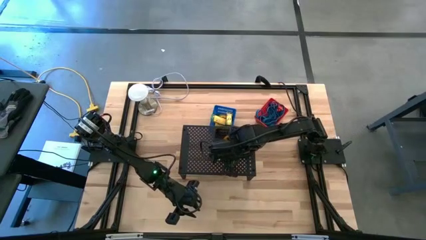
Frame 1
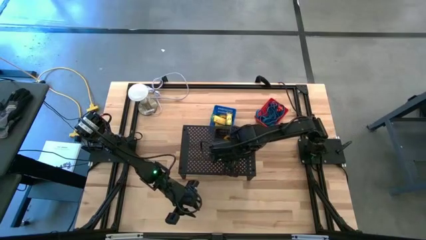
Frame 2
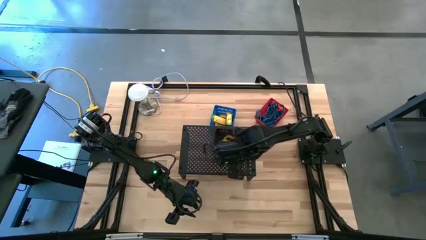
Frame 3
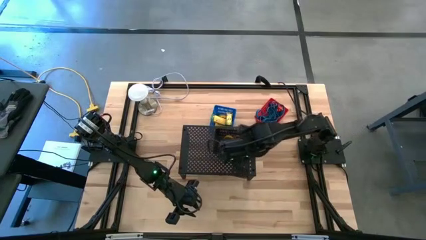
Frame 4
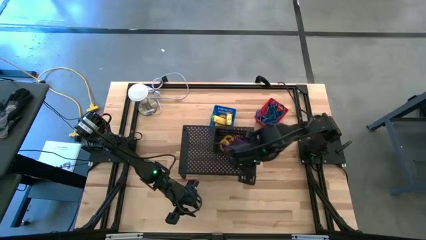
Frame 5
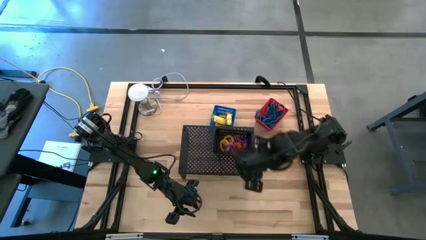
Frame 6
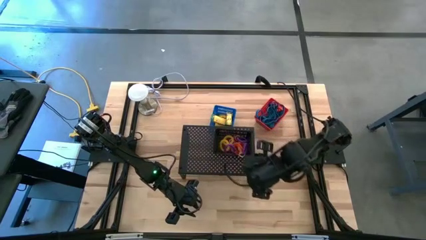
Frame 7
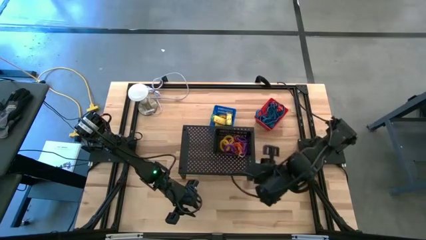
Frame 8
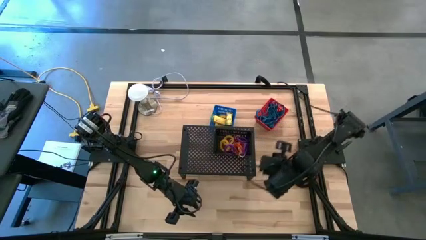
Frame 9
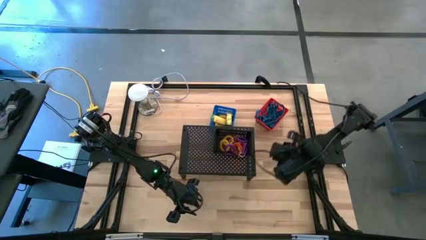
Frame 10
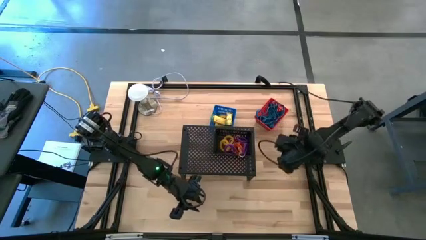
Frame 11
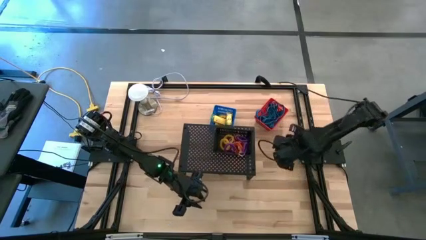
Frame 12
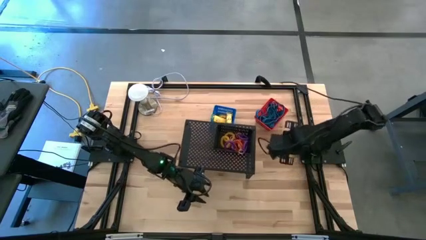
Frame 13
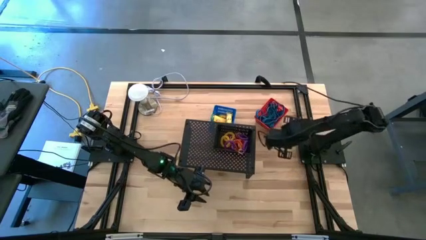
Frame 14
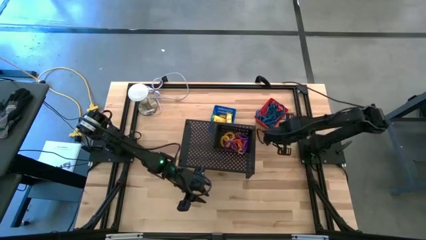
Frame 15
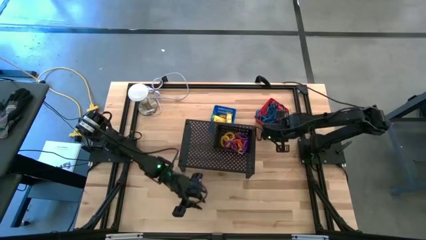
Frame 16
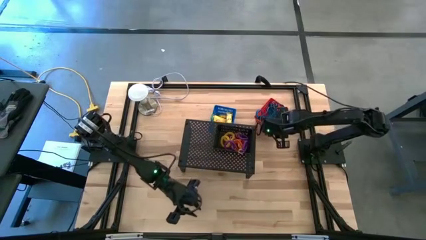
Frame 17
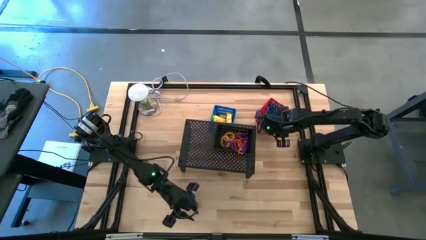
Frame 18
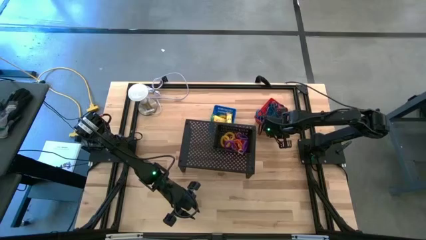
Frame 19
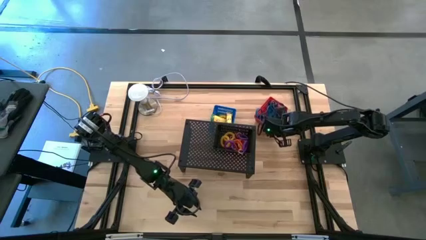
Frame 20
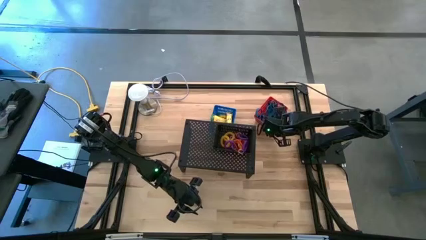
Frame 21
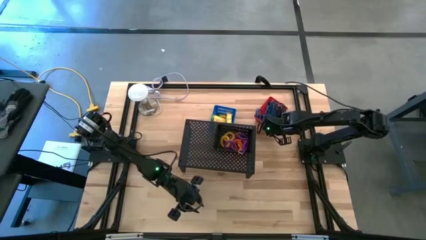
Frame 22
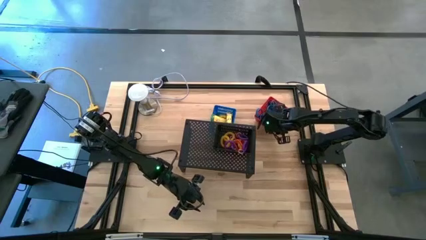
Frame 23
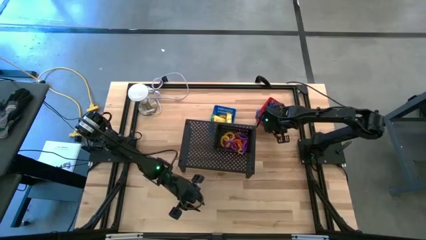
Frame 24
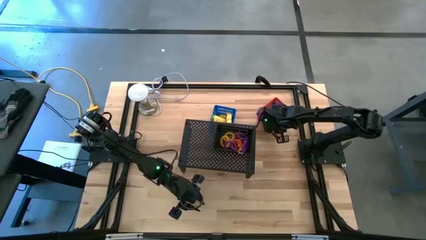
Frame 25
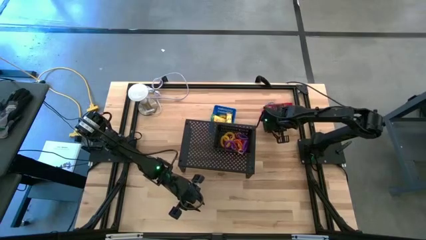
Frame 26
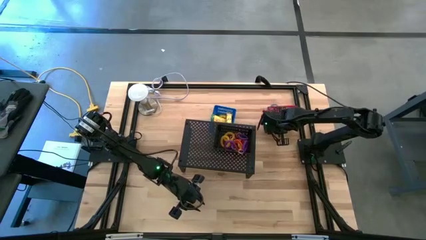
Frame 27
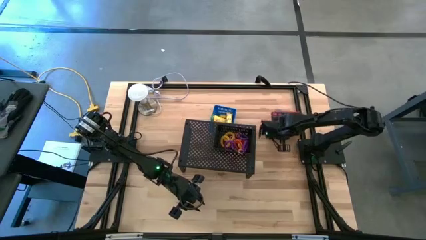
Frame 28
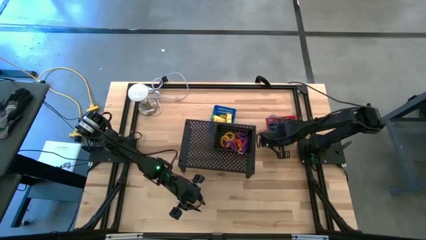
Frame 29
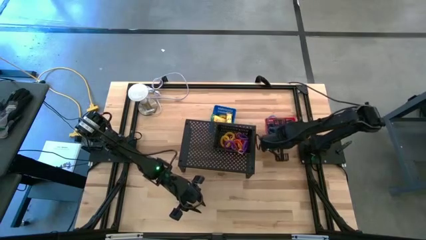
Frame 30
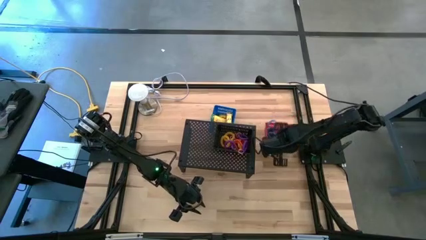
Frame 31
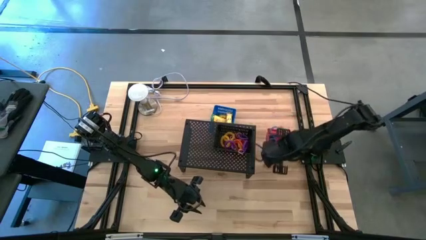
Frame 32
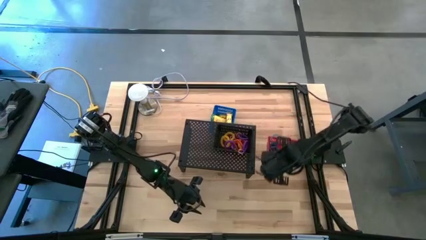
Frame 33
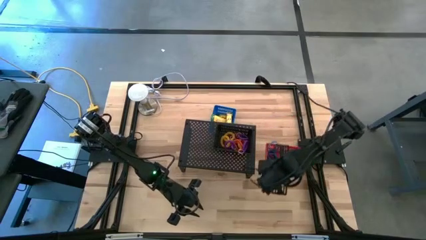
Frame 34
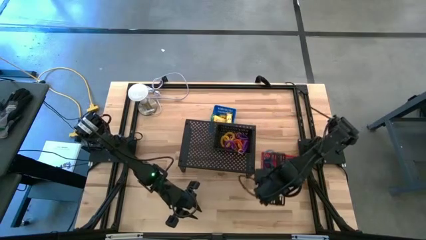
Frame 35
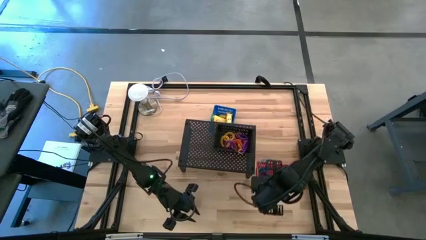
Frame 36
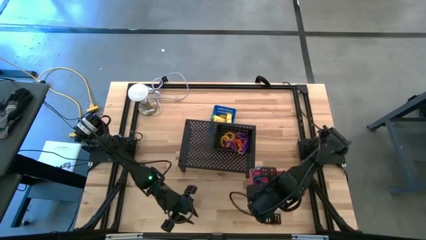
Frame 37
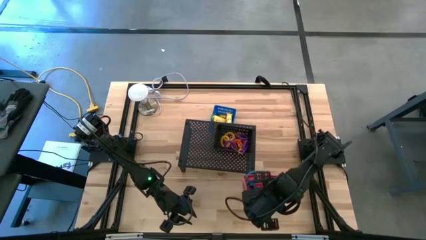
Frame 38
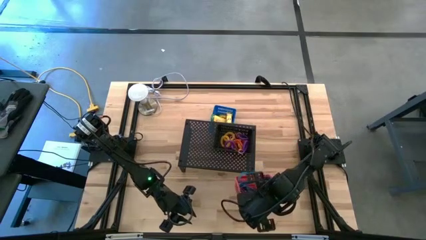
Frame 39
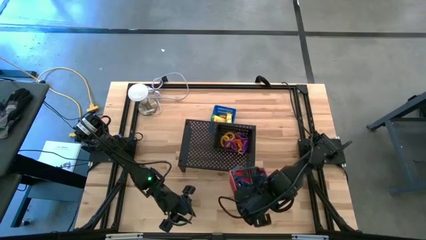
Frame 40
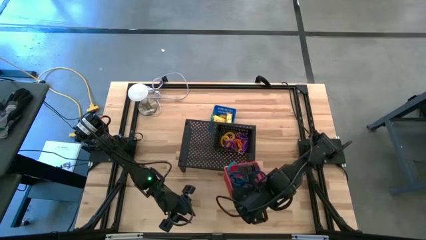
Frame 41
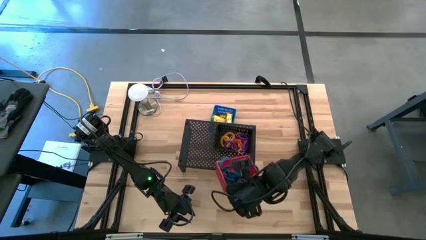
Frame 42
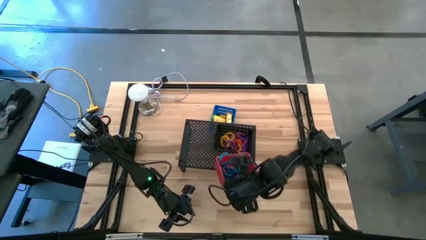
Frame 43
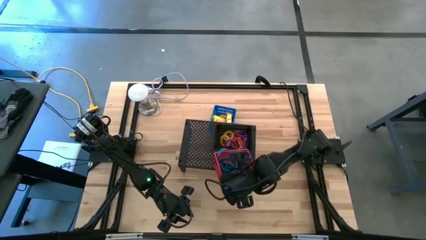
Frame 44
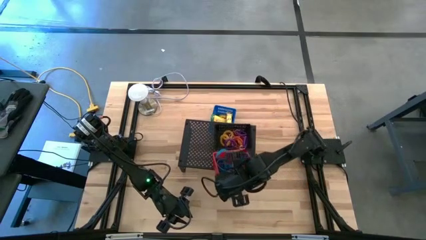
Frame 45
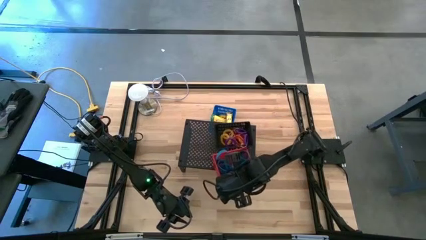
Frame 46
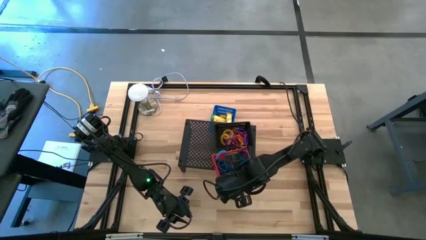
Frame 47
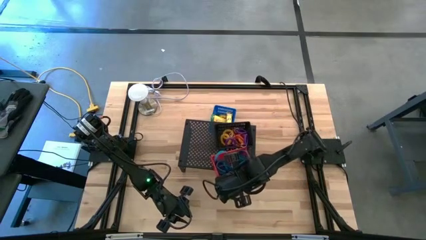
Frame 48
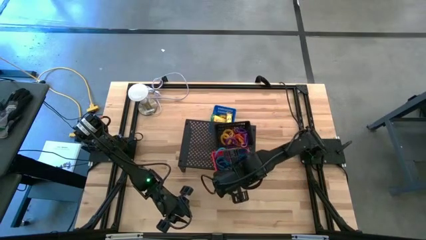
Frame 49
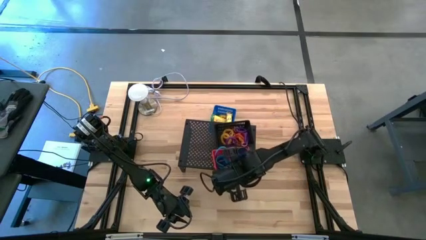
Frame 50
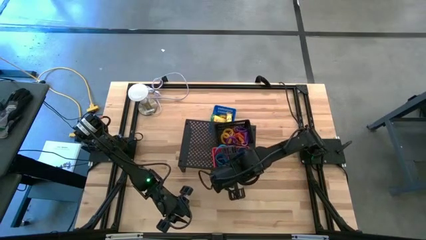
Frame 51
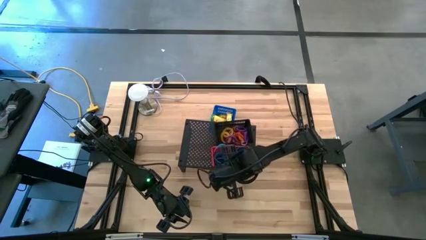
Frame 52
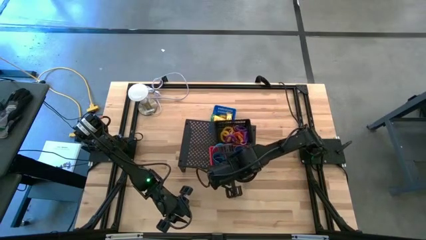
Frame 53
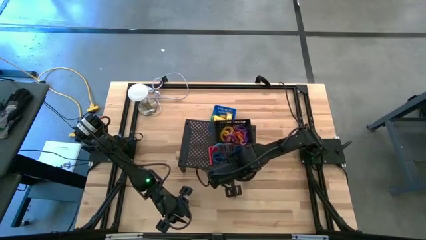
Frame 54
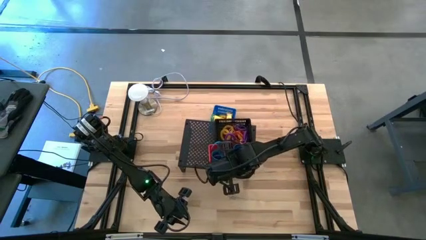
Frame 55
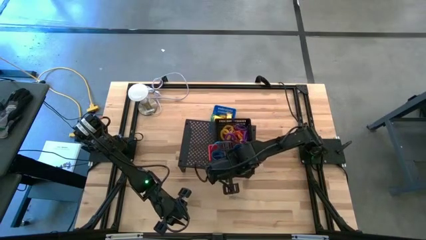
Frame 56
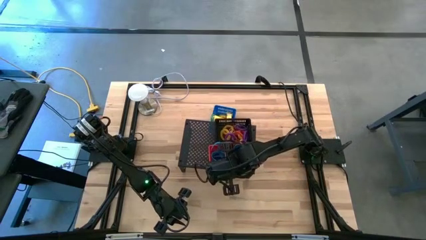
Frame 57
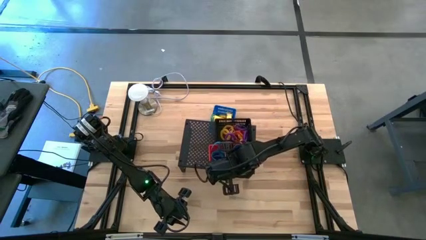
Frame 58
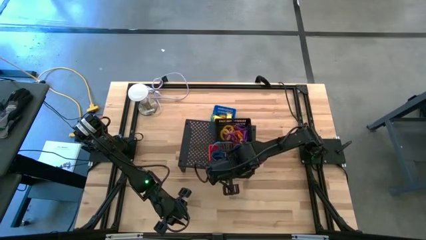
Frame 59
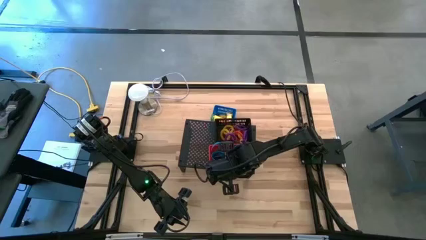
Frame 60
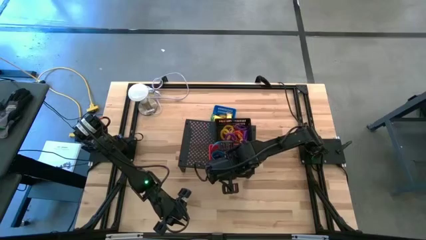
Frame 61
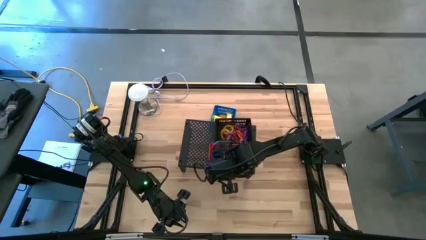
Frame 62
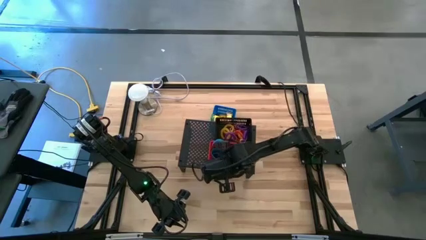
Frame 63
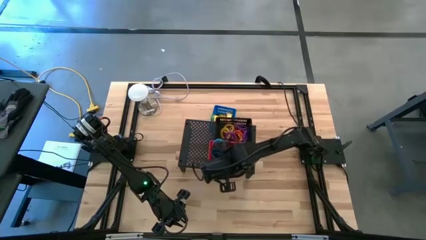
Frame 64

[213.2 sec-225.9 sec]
Task: Pick & Place Office Desk Supplies
Put the red bin on the shelf

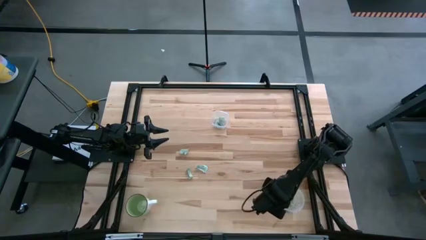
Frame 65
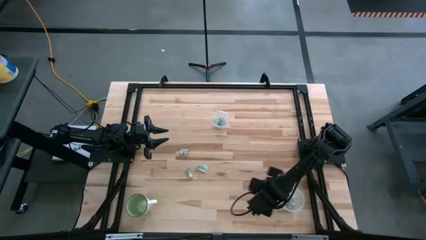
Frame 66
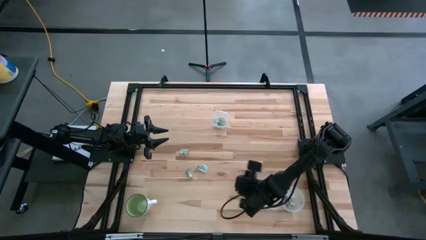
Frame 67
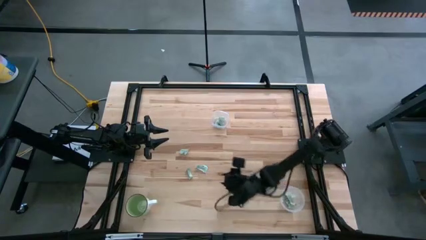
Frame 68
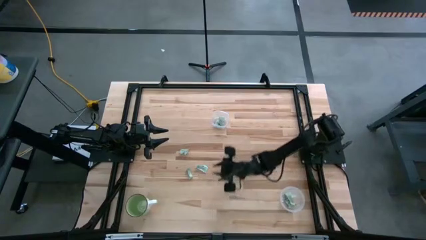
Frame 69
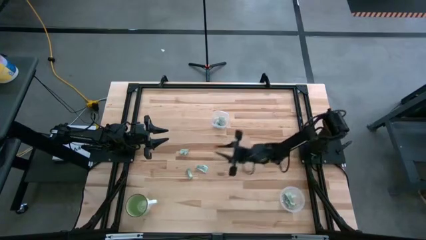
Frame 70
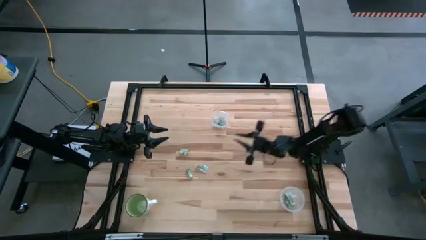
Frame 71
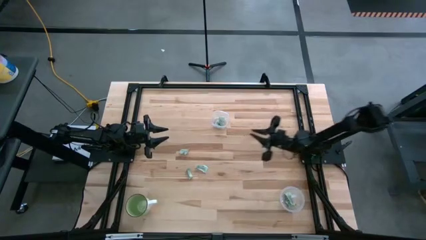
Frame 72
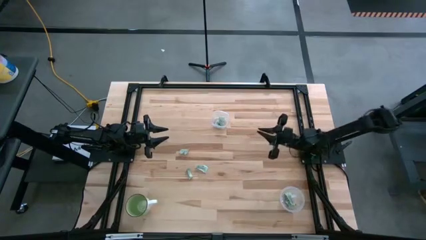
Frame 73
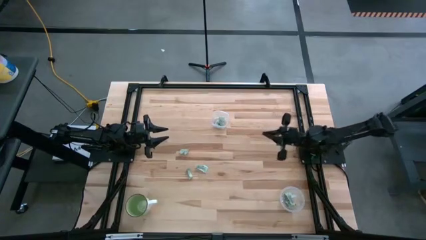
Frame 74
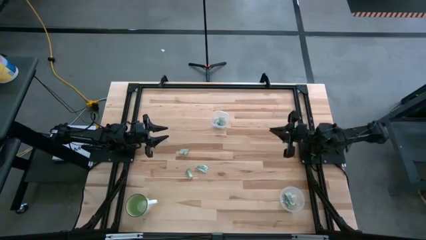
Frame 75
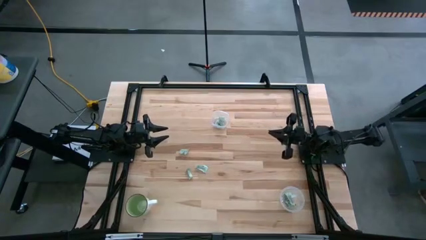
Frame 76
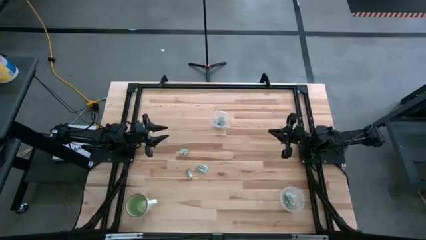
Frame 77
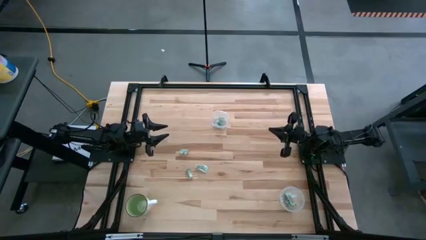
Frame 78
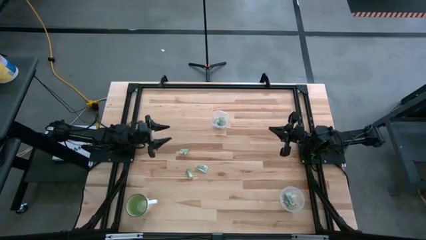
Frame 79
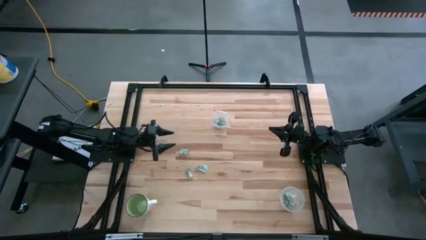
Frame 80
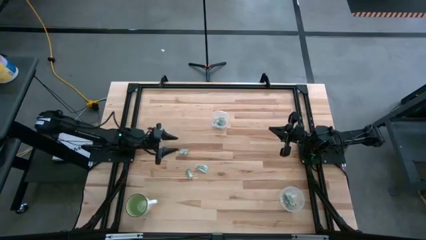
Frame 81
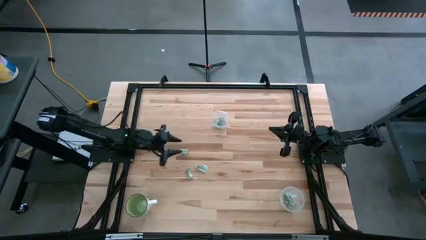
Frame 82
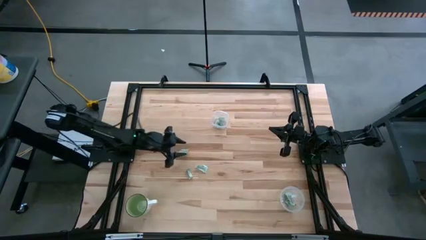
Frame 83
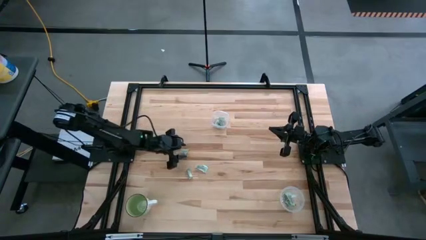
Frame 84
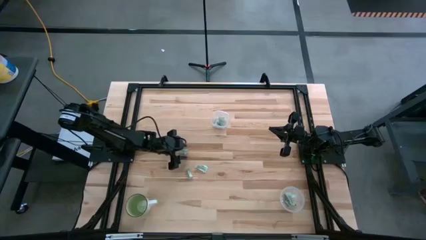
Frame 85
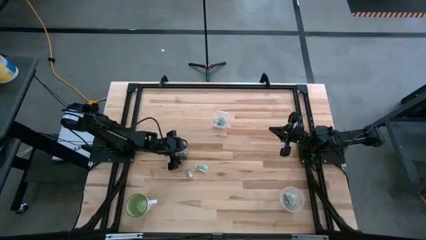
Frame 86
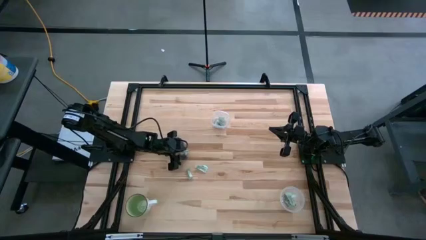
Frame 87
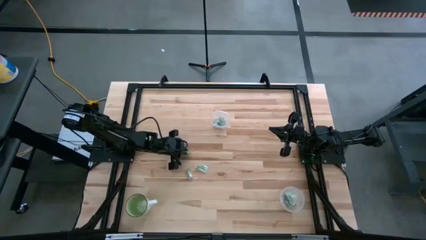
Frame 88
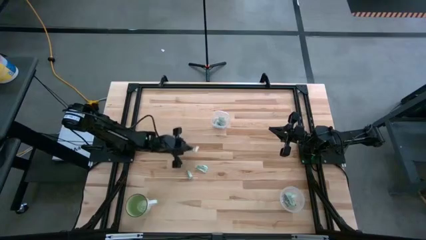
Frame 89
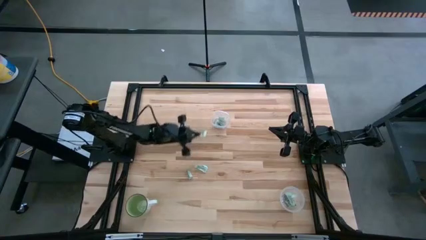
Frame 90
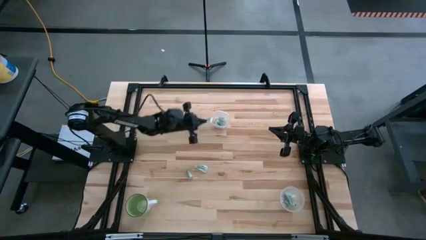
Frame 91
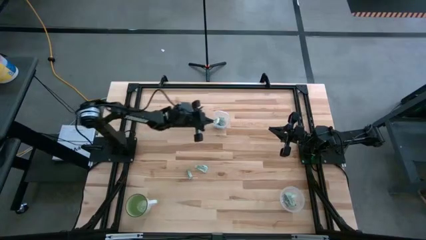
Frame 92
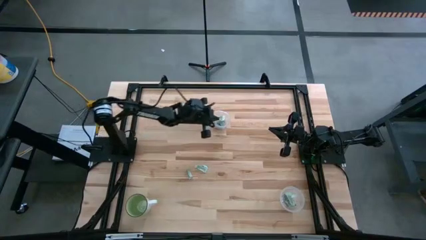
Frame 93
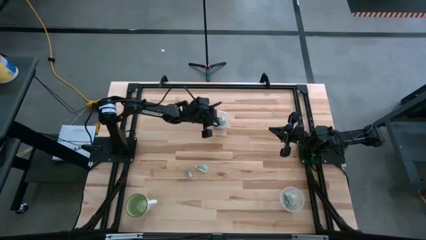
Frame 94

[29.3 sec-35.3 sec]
Task: Pick and place items into bin
Put the green stevia packet into the square transparent bin
